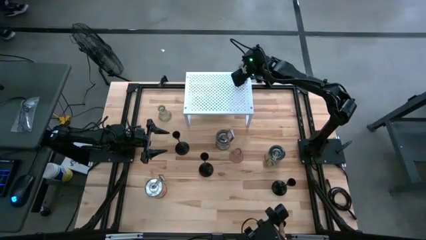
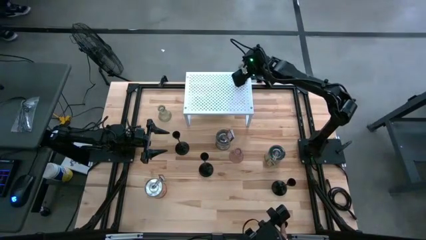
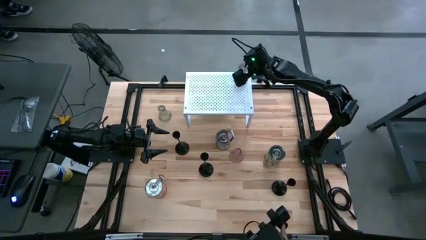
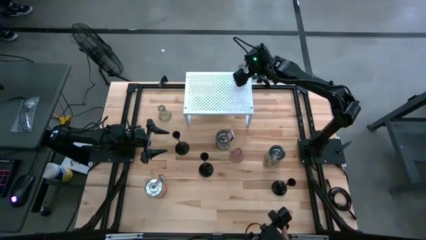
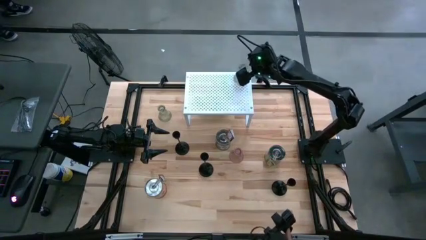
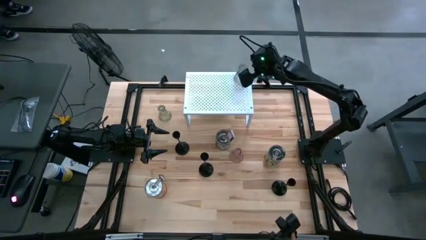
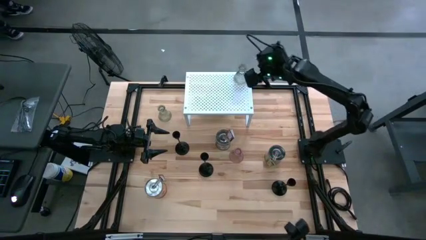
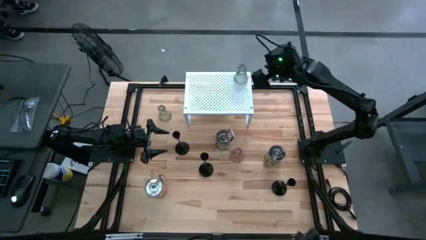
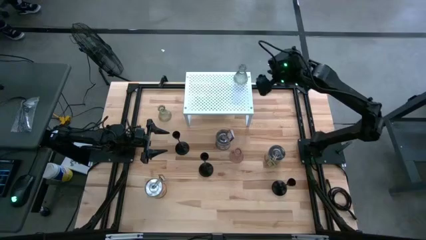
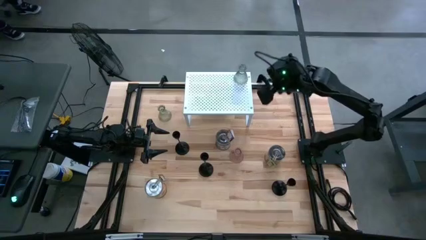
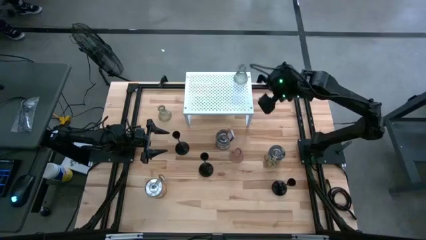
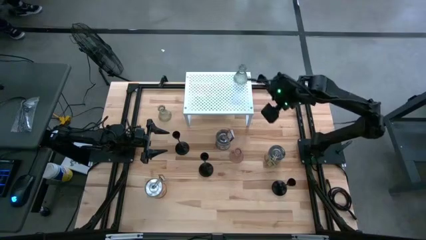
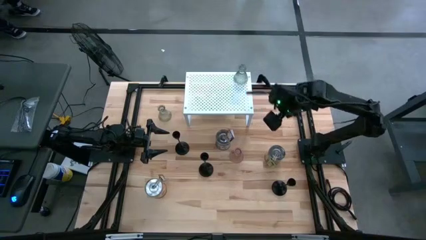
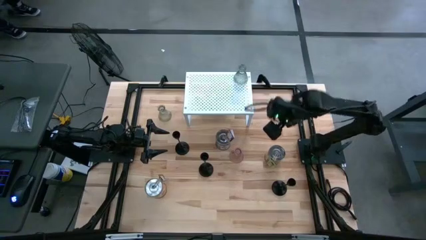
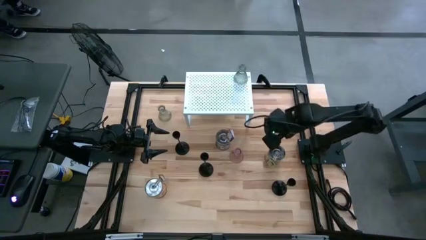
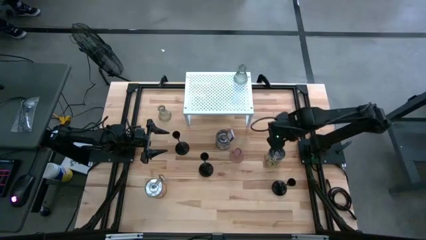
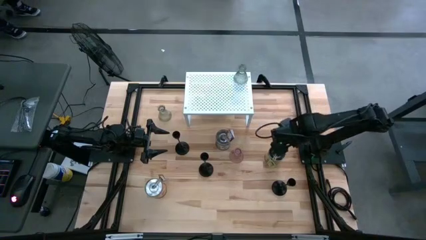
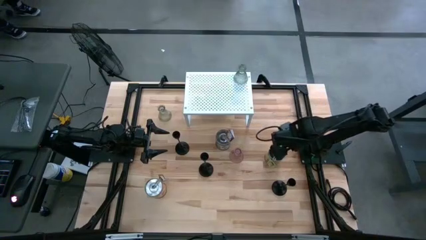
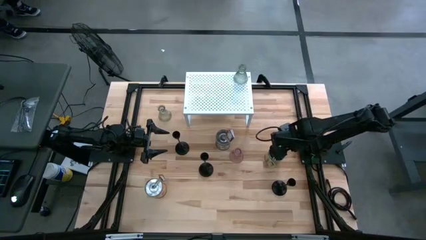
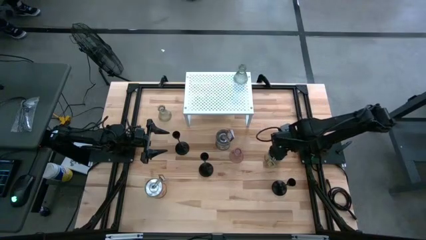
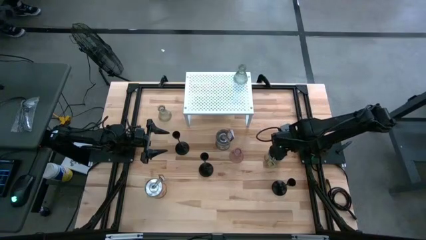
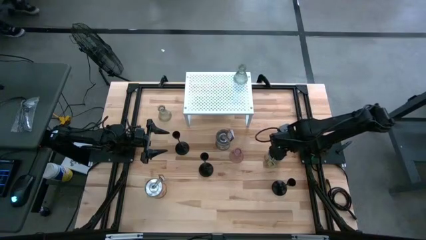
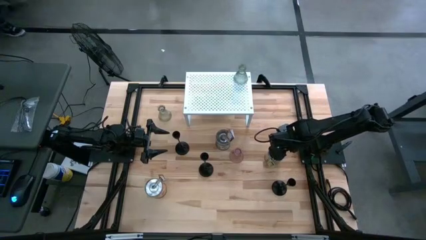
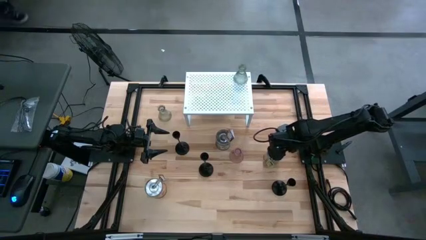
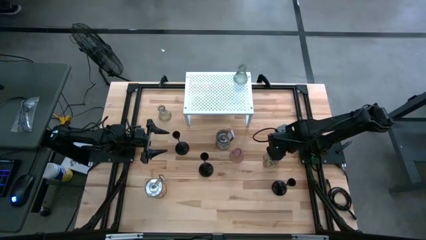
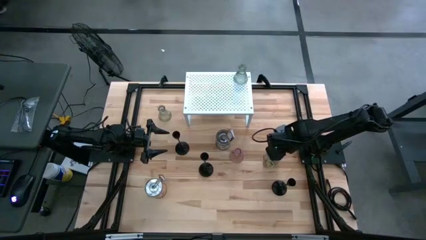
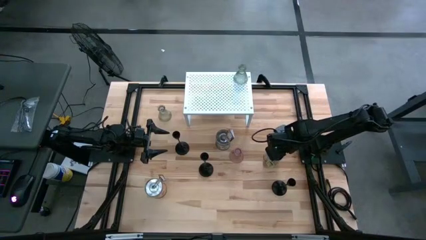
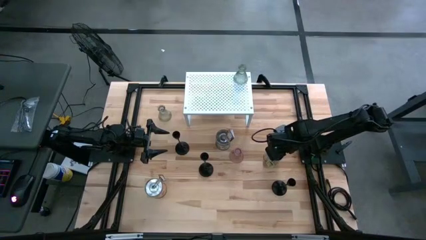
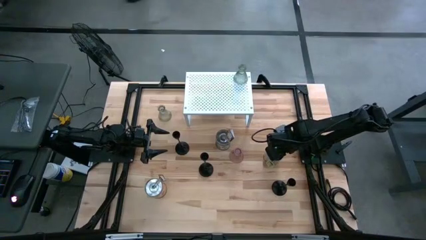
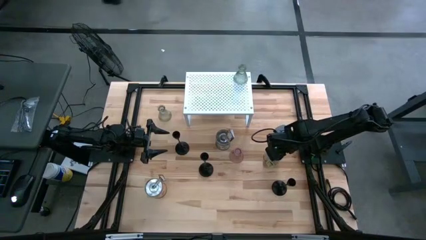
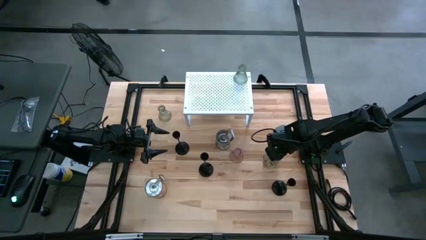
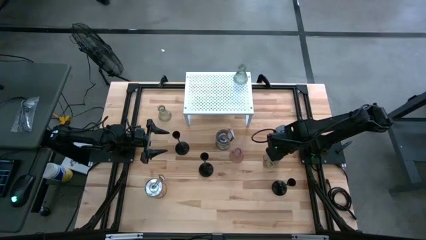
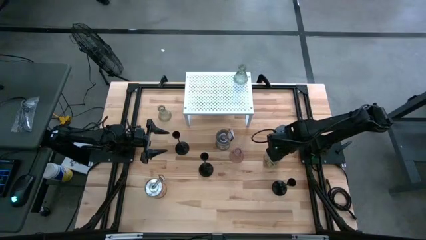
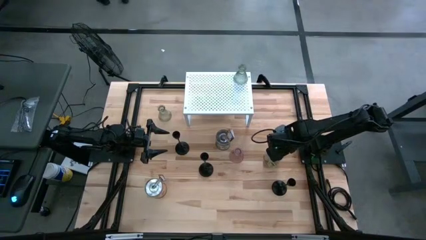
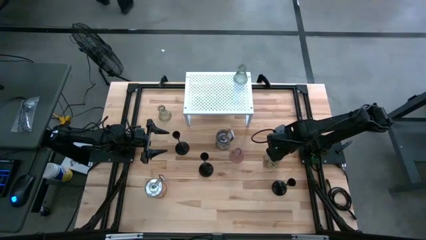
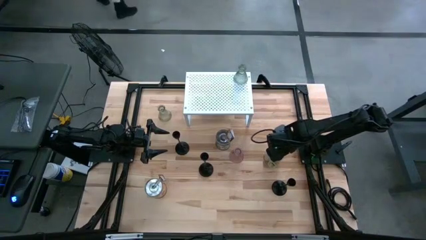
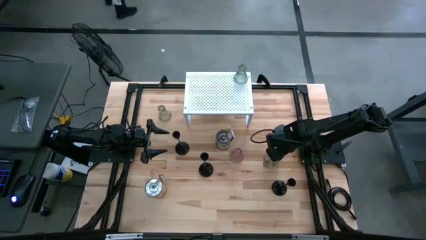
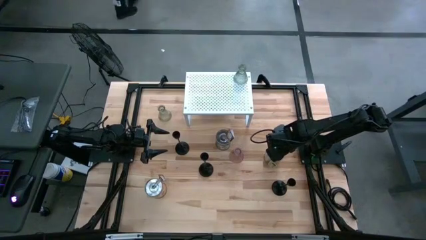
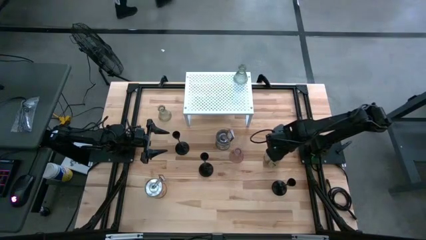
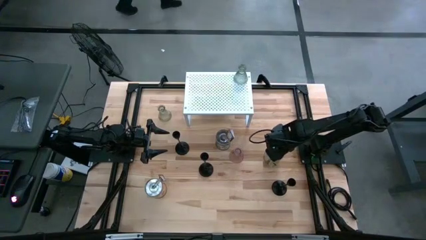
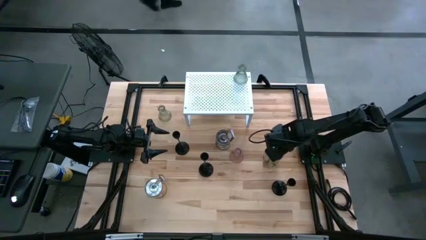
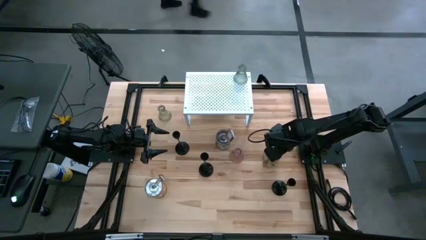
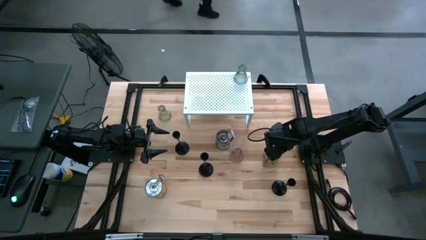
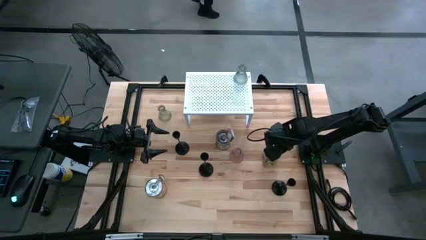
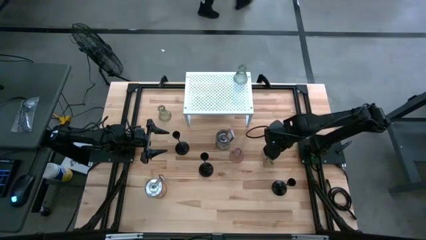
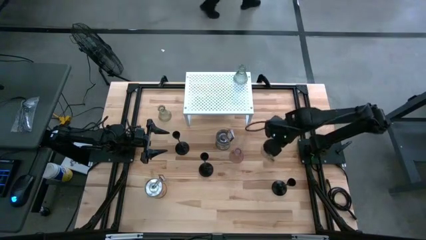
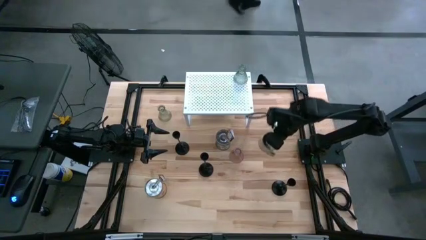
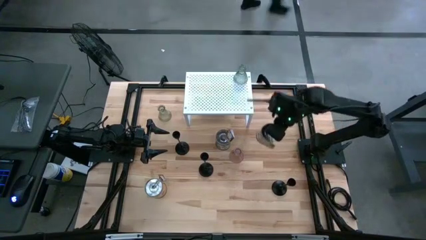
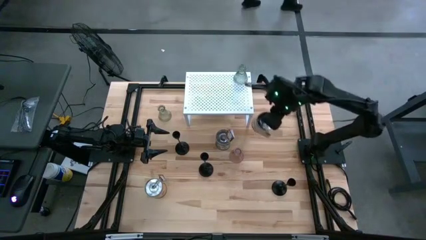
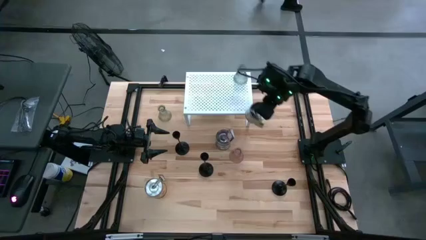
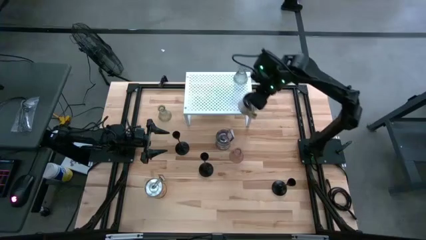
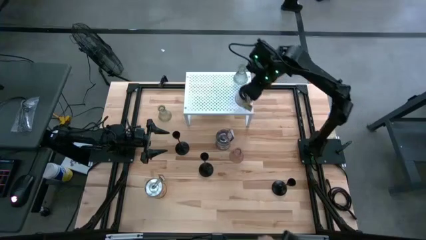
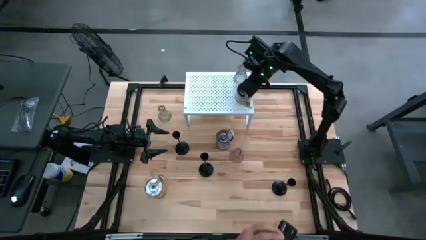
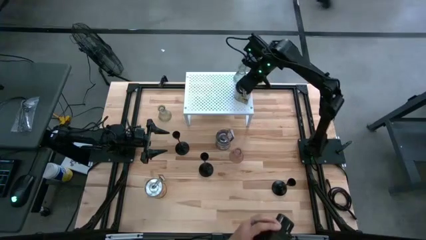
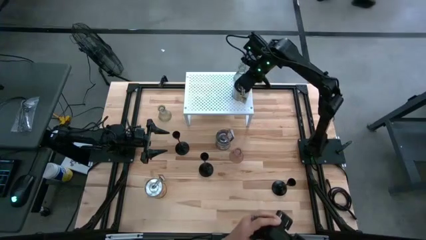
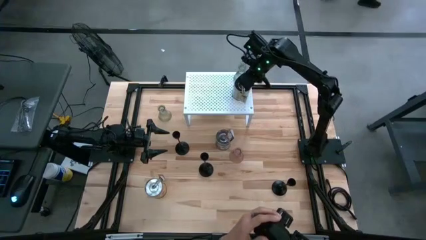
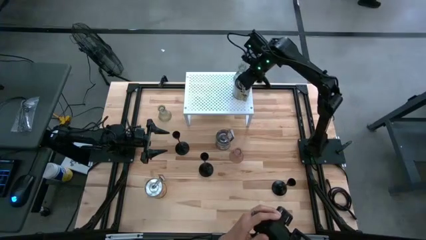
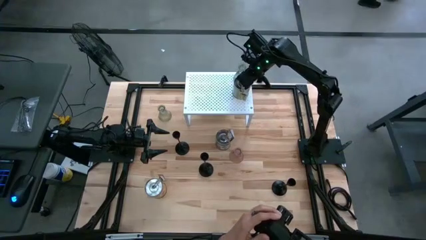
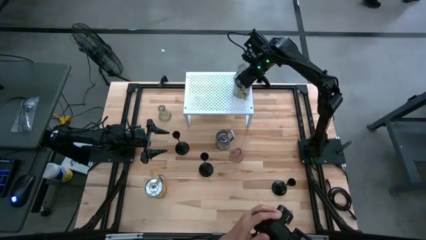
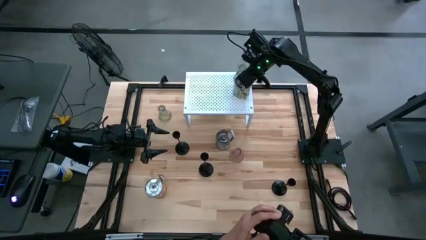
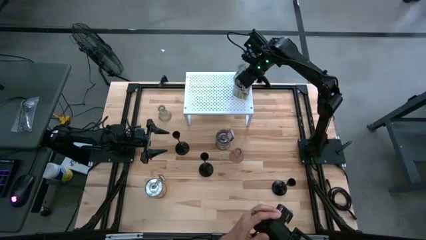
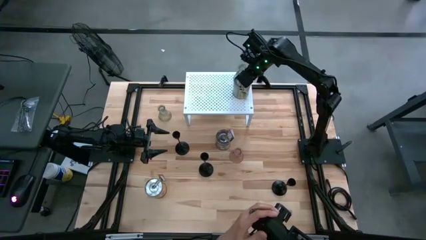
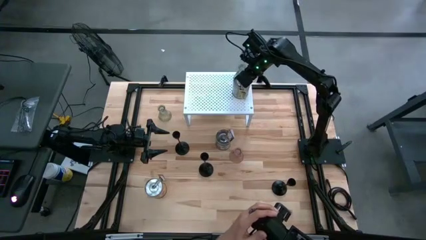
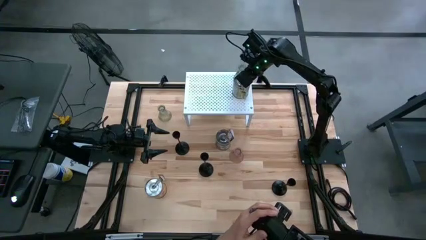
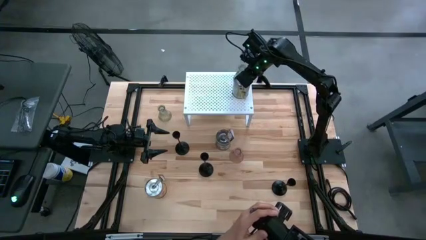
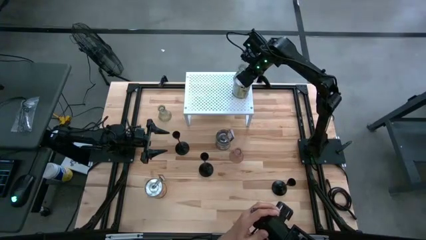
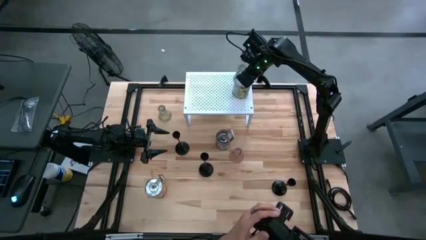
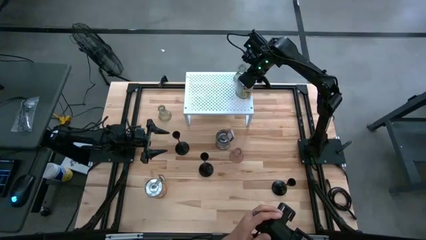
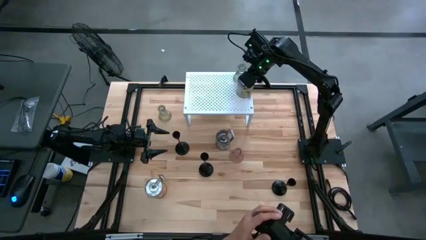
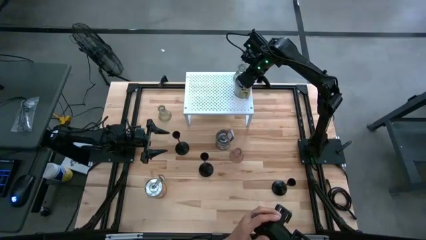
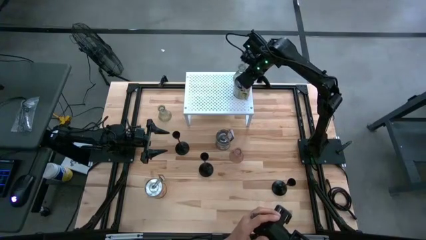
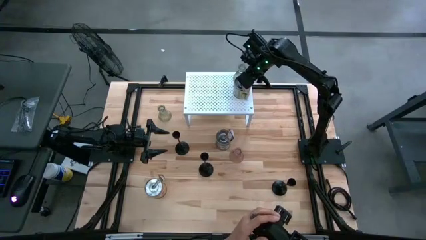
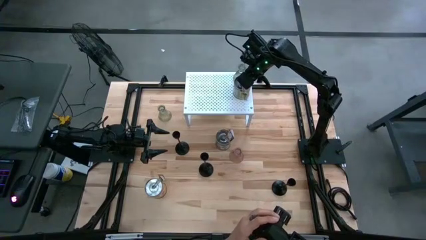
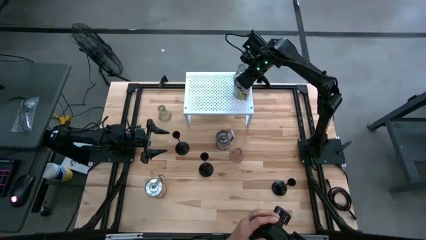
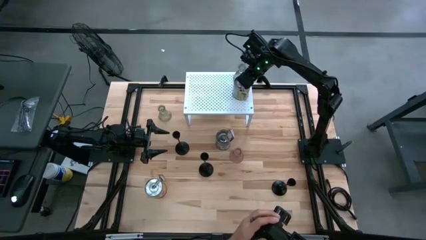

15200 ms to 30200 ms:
Task: Pick & Place candle stick holders
Put the green scented candle on the shelf

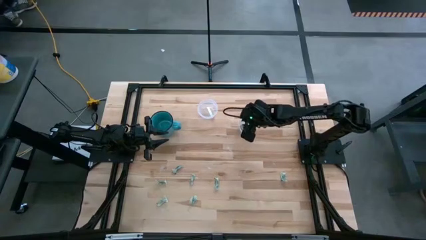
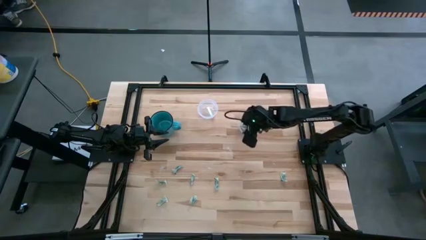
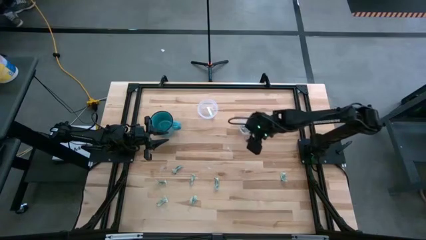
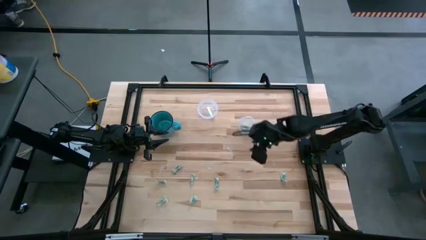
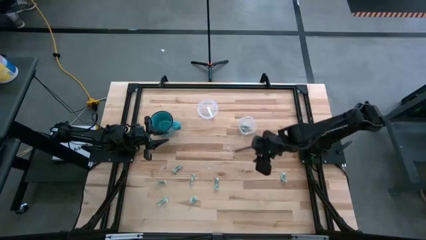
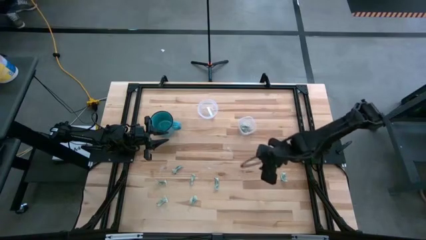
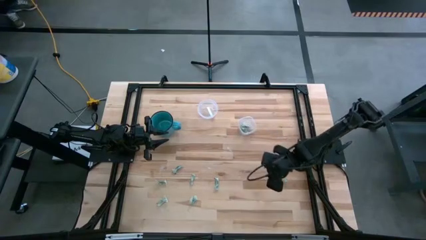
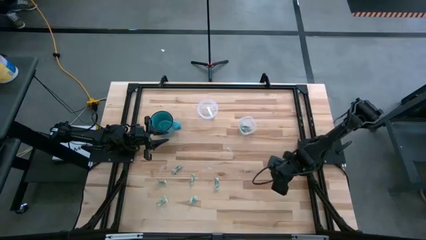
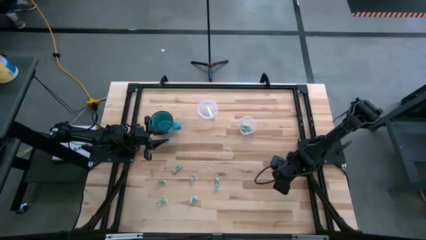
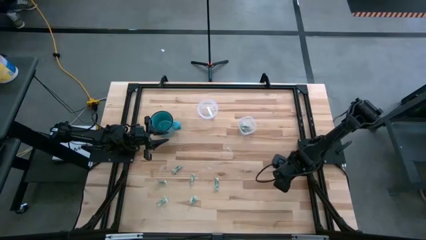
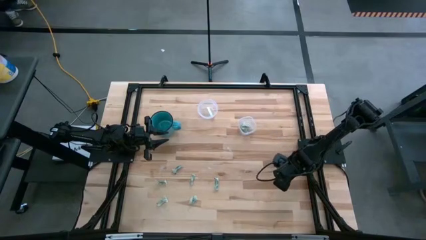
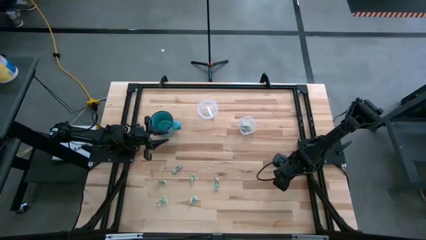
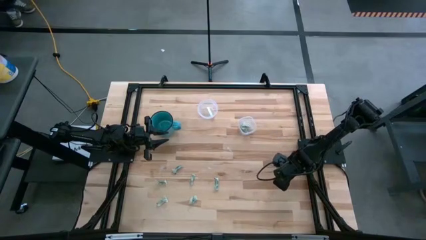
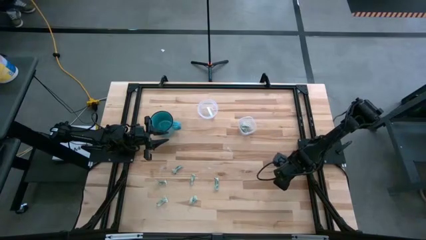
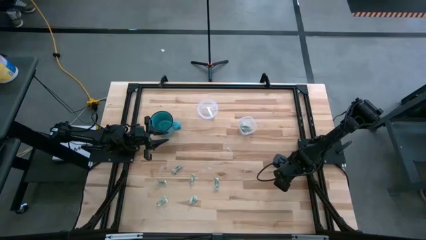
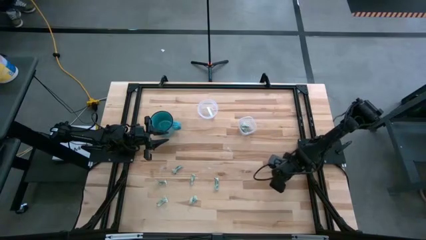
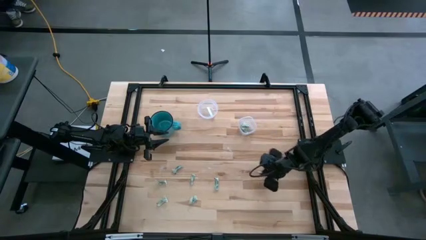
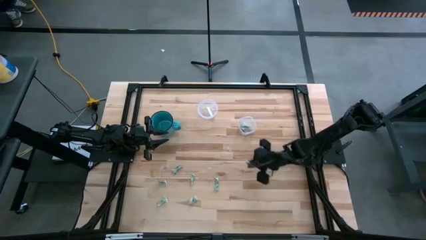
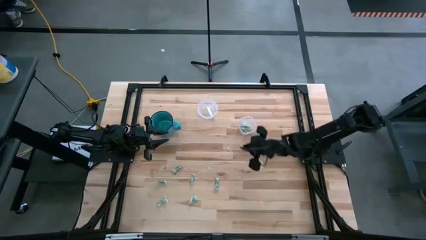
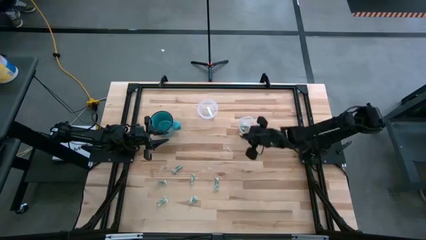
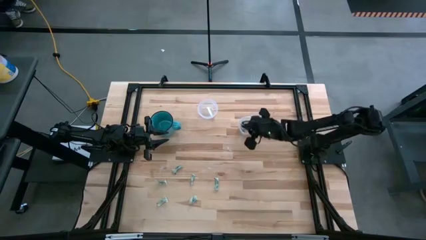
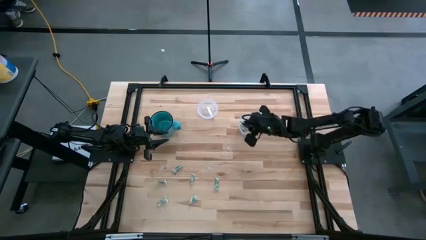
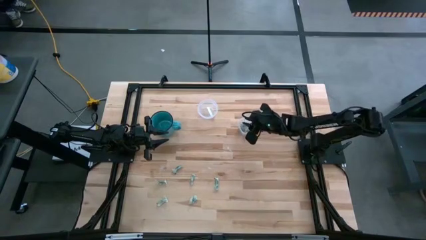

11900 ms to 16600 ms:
Task: Pick and place items into bin
Put the stevia packet into the small transparent bin
